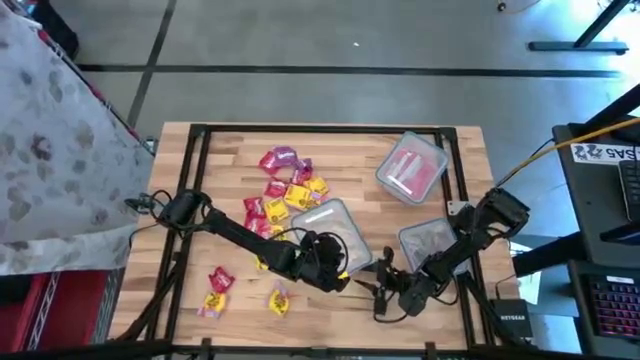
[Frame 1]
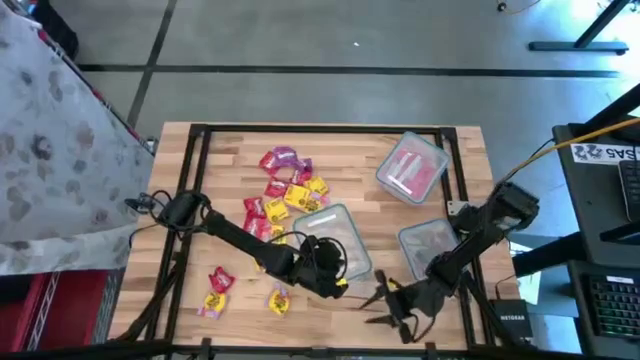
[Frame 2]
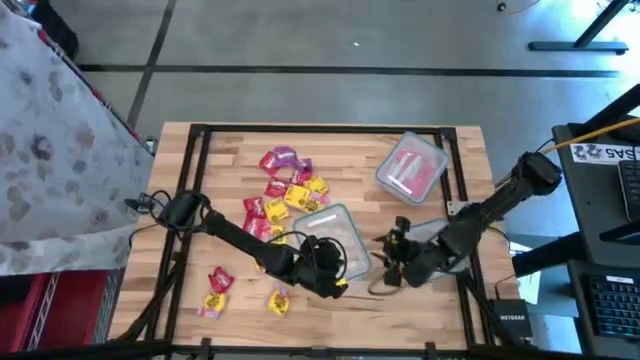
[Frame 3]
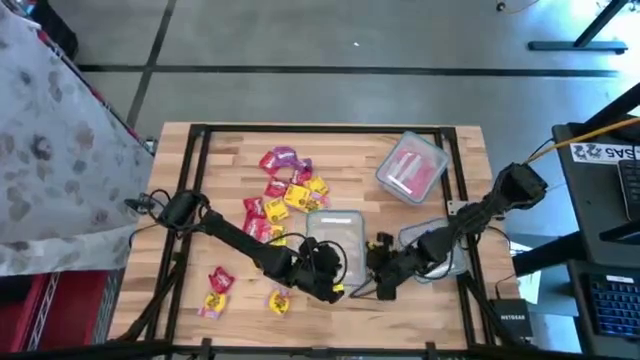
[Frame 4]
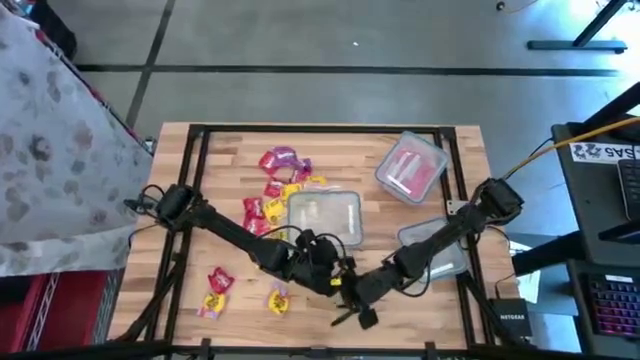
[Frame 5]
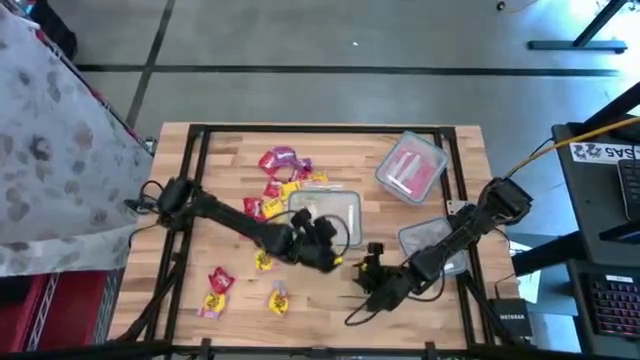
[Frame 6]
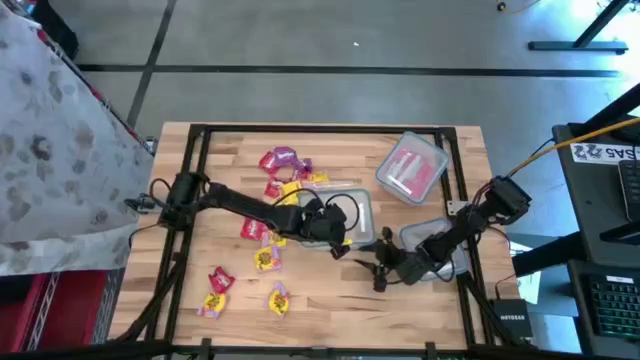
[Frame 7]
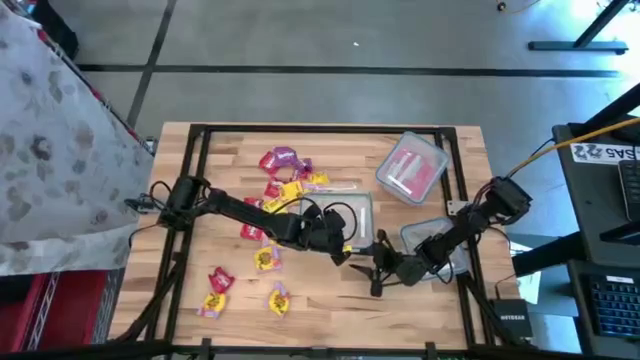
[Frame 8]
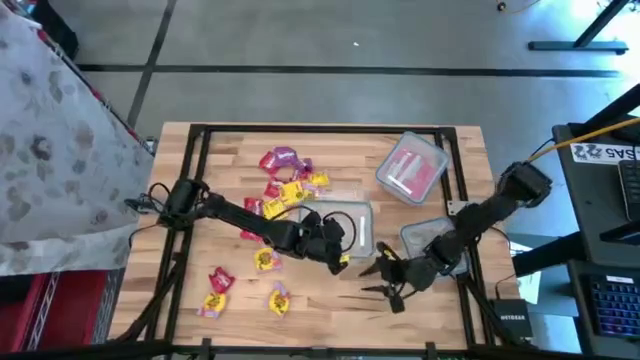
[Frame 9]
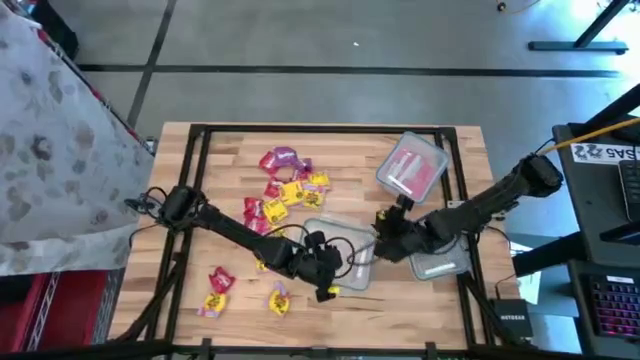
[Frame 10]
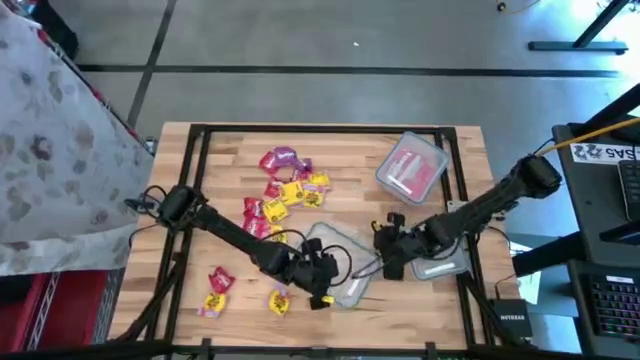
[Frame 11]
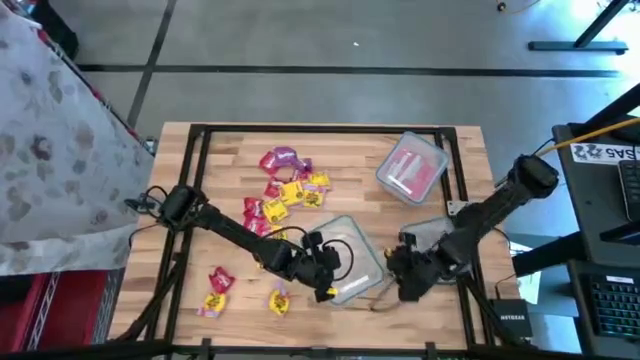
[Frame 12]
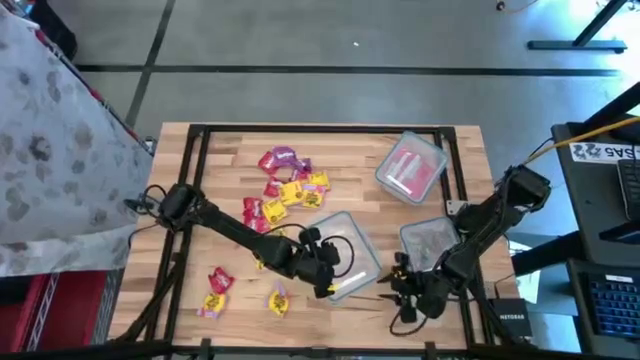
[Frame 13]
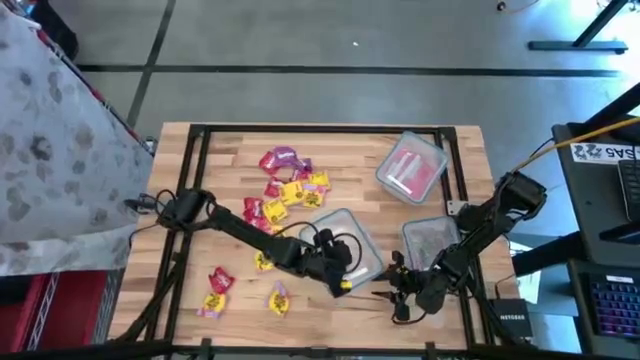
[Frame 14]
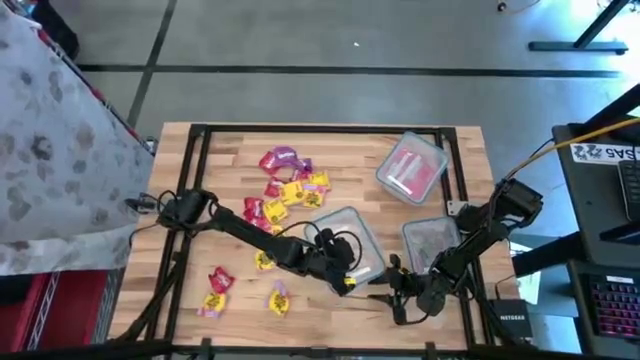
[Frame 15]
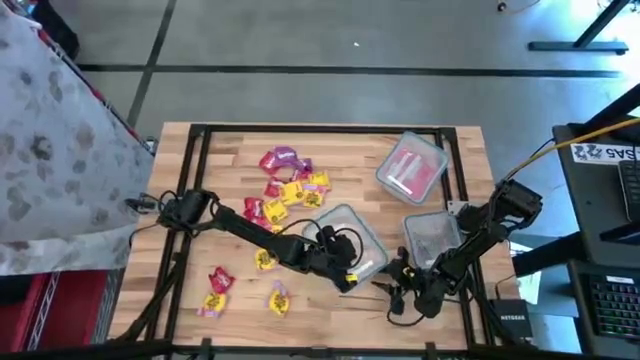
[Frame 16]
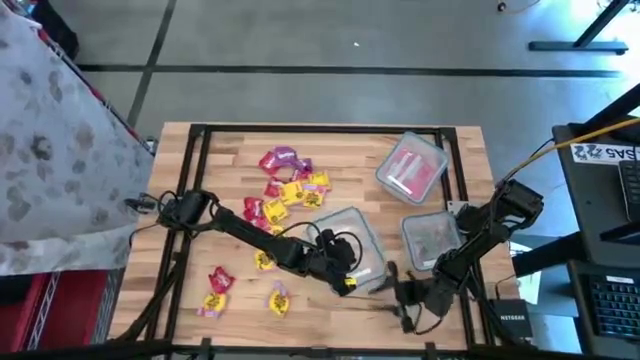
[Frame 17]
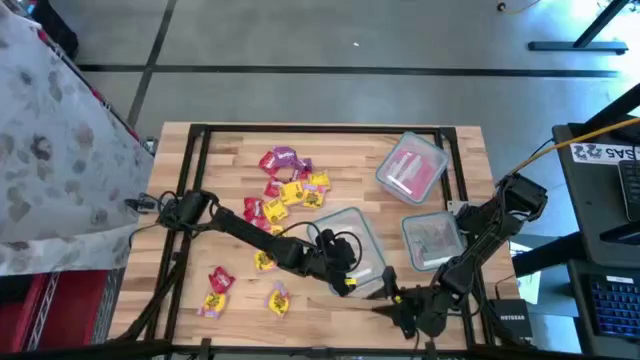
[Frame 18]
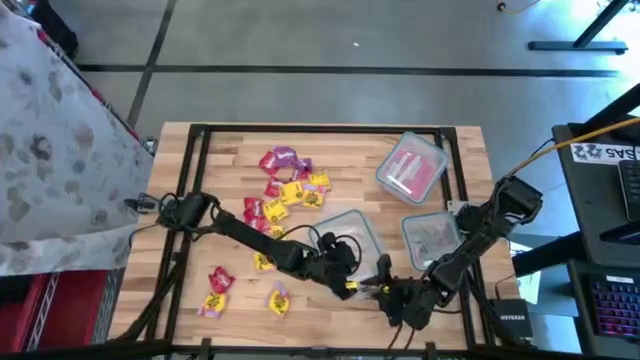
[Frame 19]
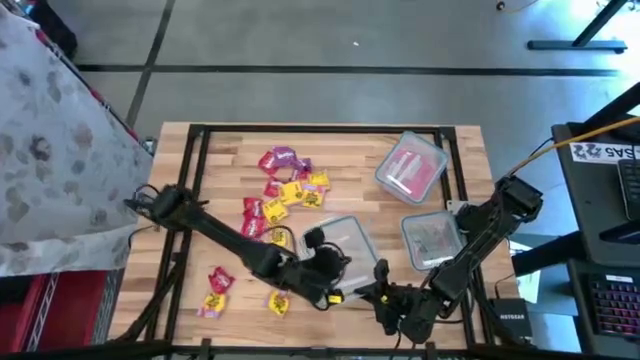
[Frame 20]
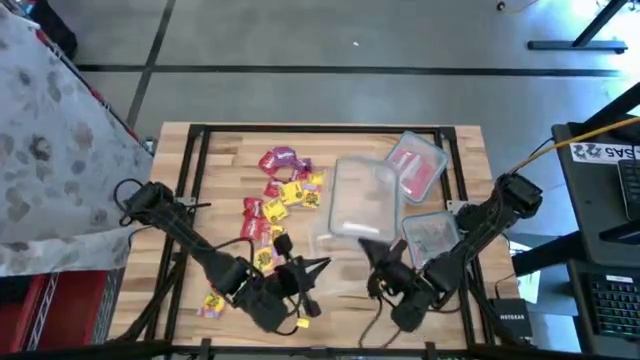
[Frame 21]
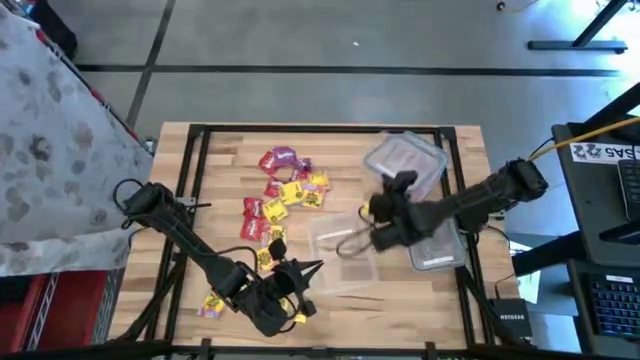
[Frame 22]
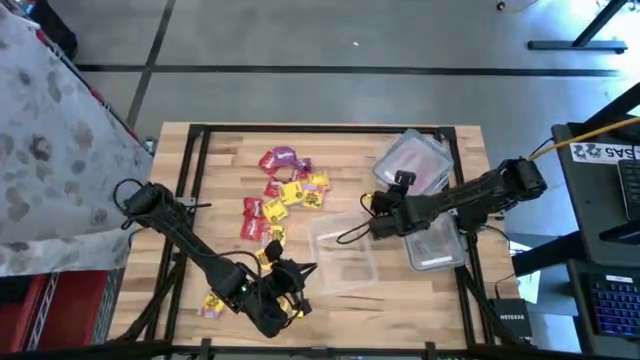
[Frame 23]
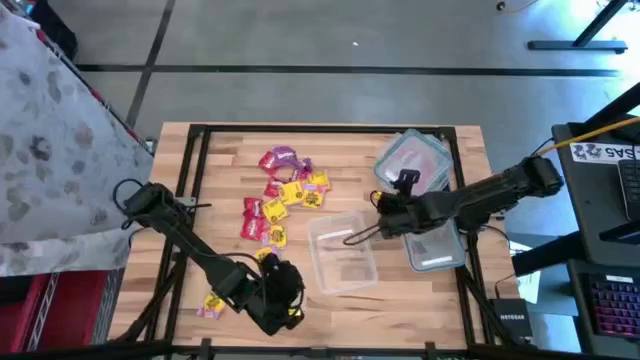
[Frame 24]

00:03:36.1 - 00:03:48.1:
Task: Sort candy
Open the rectangular transparent food container

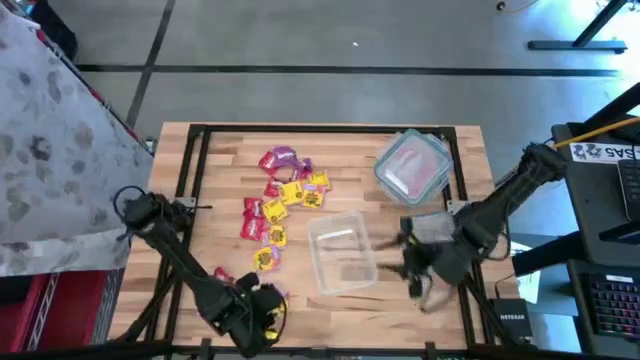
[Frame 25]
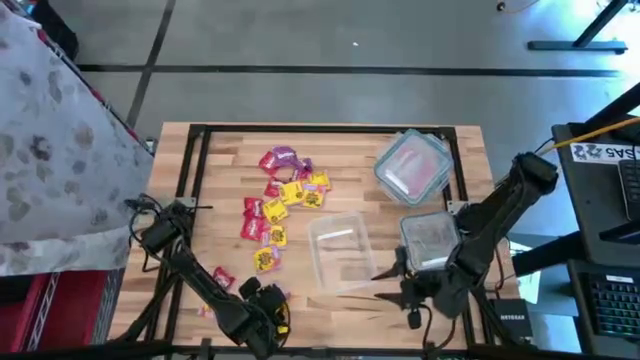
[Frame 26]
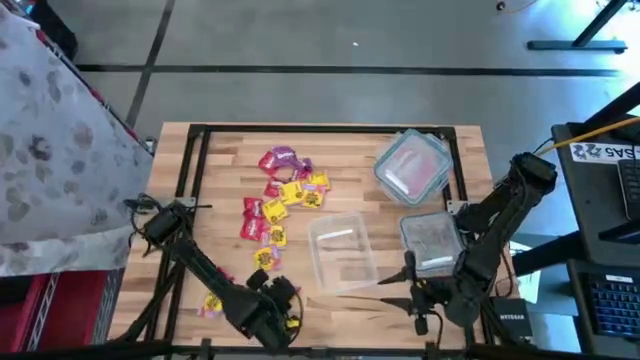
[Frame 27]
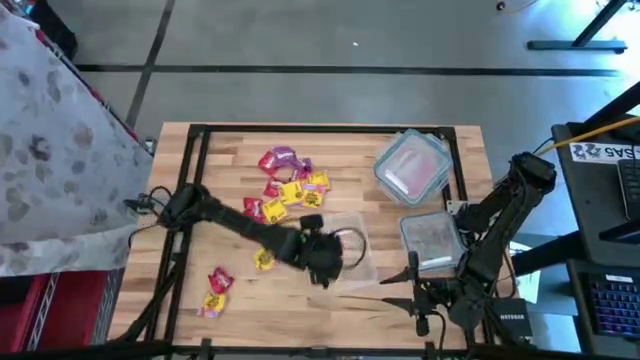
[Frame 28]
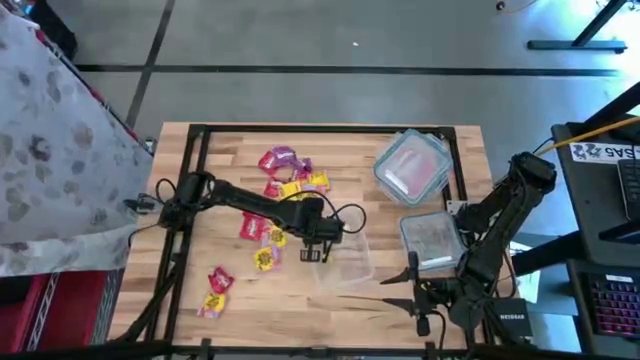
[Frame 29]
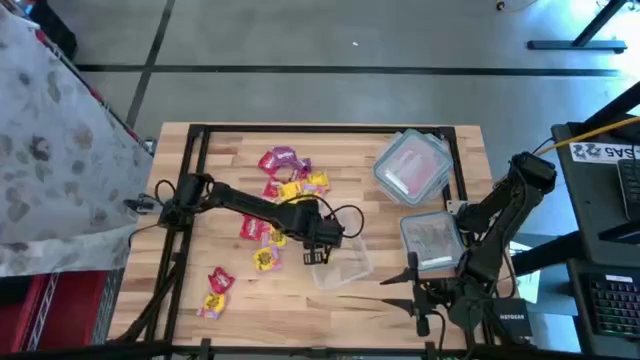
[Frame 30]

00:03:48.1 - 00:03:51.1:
Put the yellow candy into the rectangular transparent food container

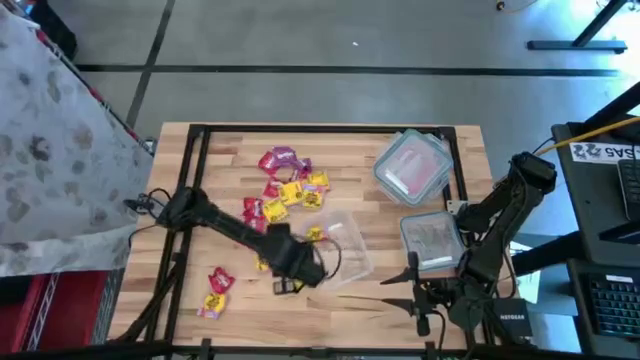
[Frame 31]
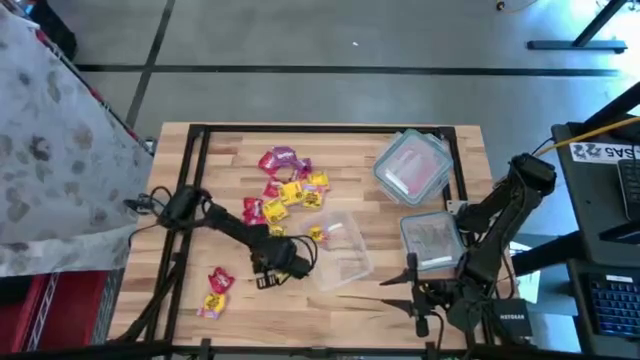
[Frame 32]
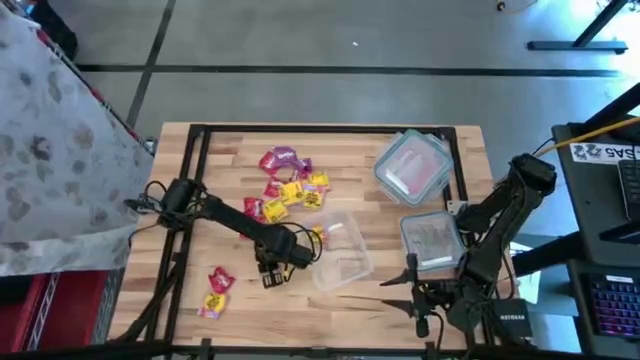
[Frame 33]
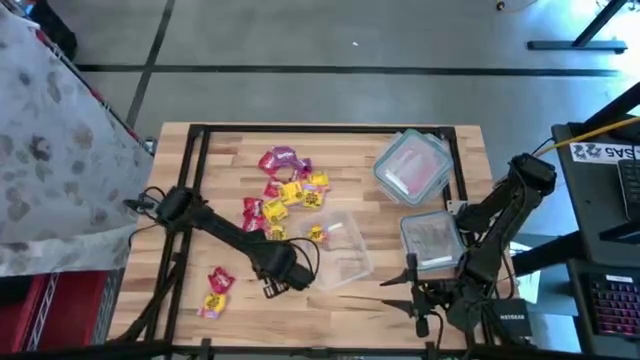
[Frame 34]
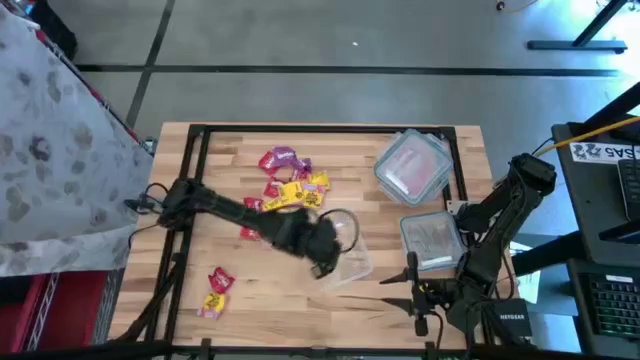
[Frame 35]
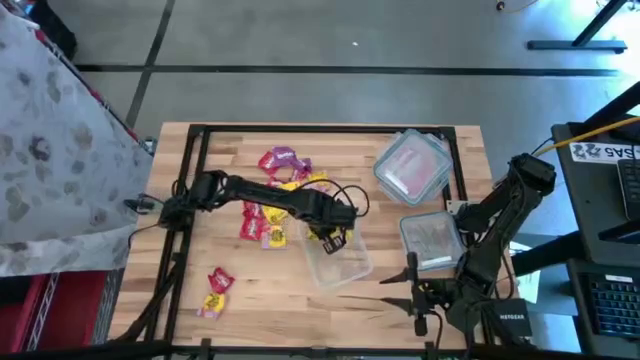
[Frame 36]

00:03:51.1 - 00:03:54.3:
Put the yellow candy into the rectangular transparent food container

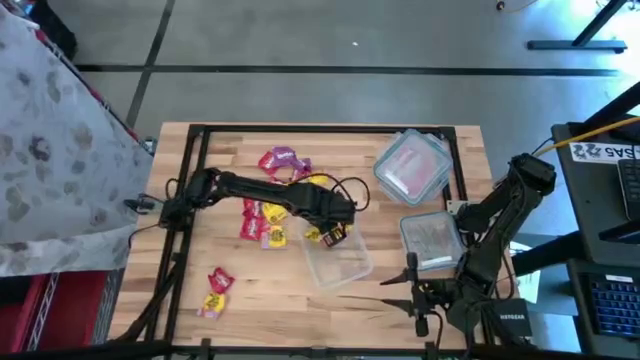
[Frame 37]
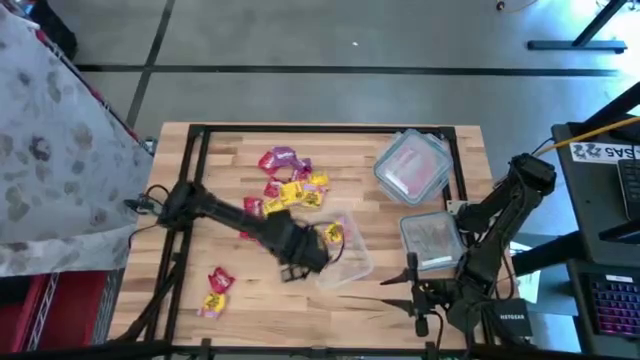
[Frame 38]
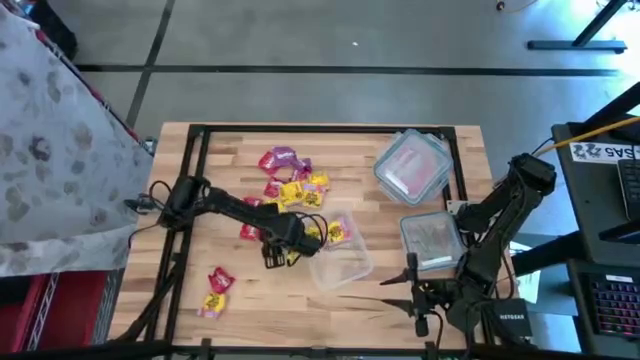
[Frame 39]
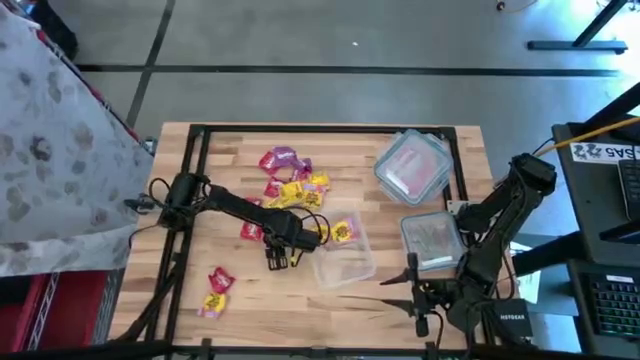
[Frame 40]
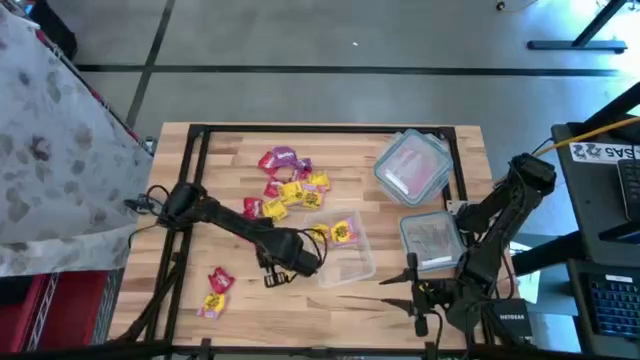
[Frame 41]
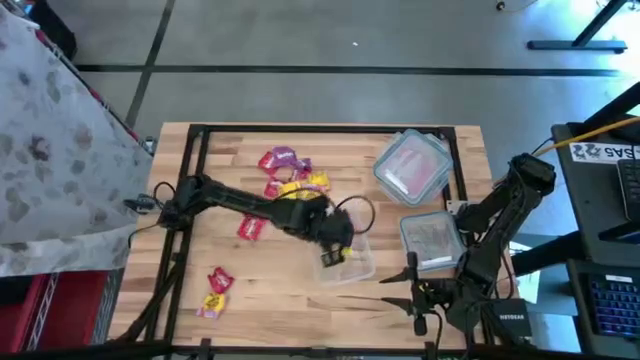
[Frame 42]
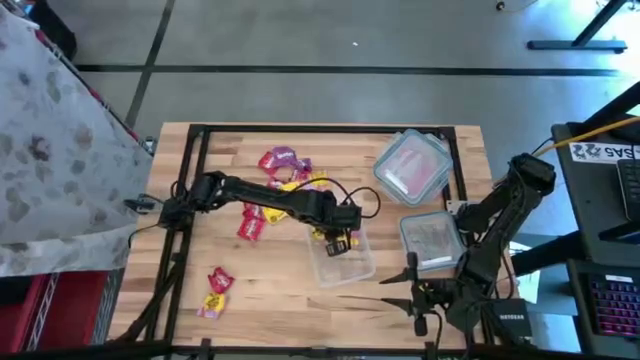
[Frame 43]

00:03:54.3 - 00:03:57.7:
Put the yellow candy into the rectangular transparent food container

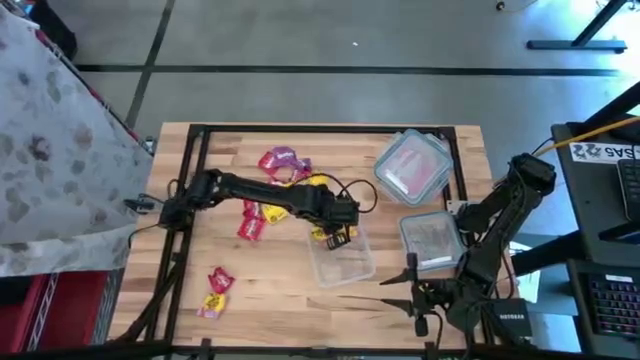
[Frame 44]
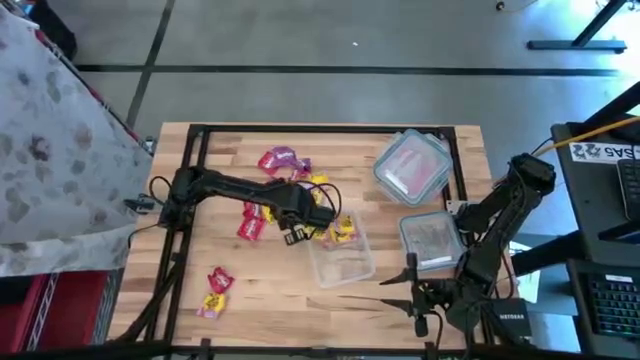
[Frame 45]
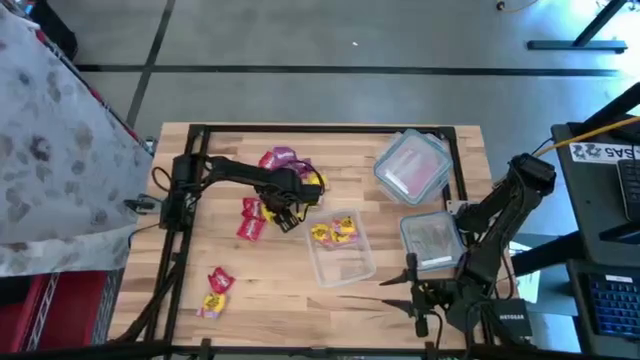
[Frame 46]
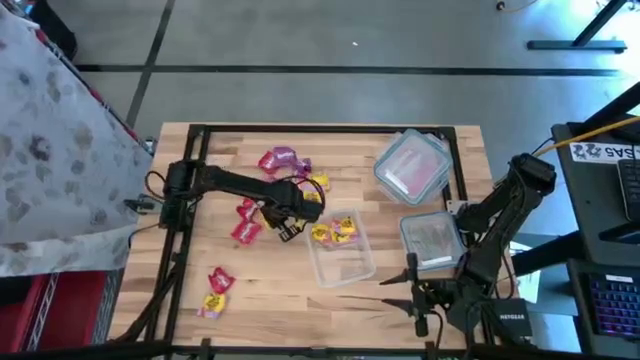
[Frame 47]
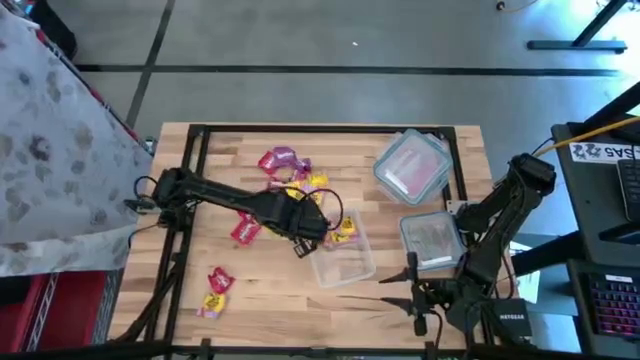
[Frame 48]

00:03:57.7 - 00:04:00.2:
Put the yellow candy into the rectangular transparent food container
